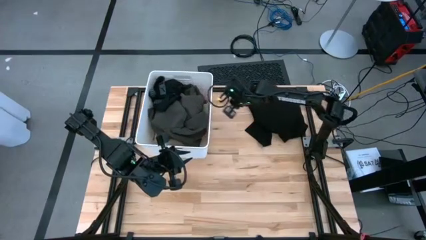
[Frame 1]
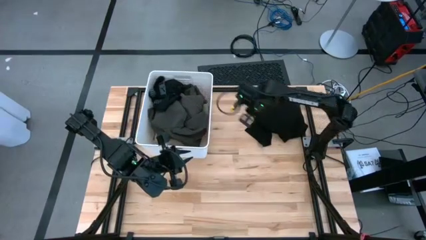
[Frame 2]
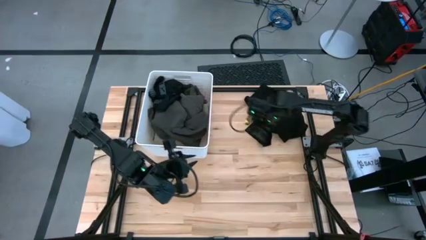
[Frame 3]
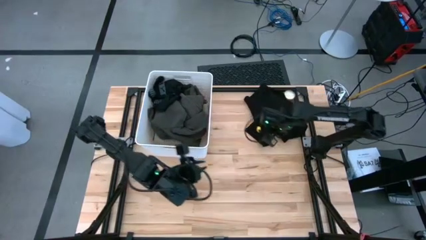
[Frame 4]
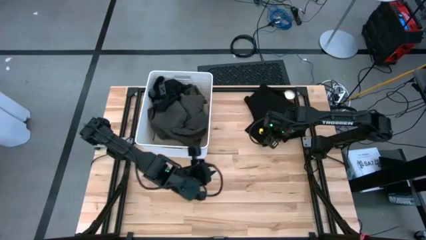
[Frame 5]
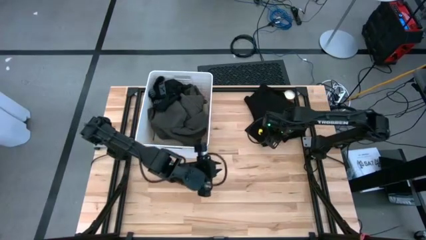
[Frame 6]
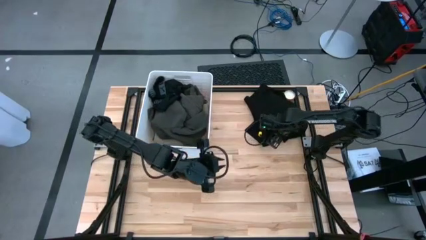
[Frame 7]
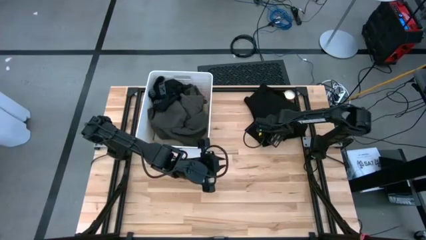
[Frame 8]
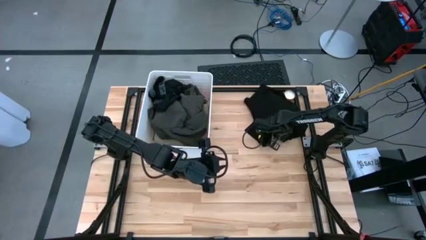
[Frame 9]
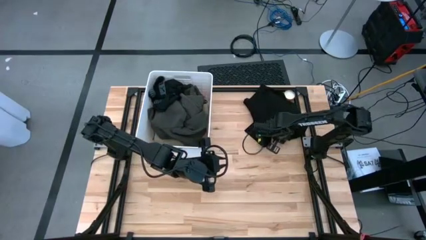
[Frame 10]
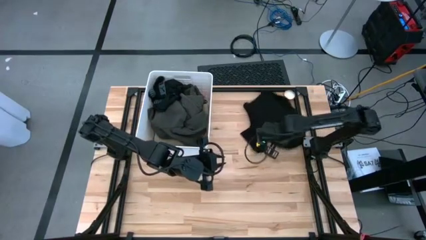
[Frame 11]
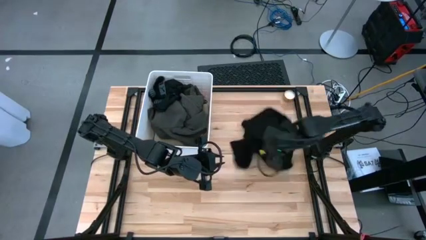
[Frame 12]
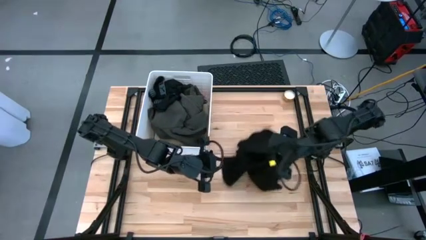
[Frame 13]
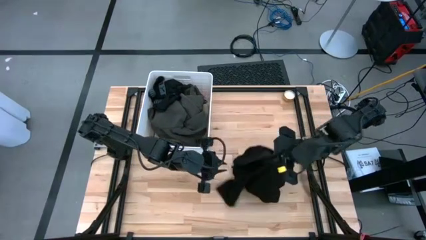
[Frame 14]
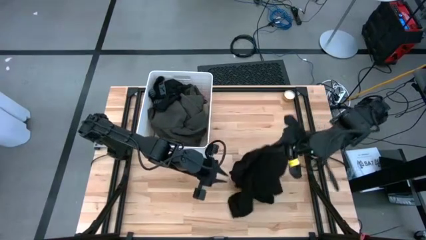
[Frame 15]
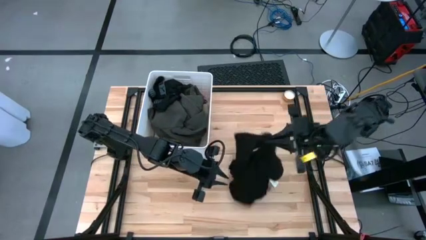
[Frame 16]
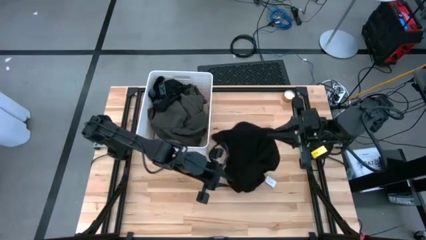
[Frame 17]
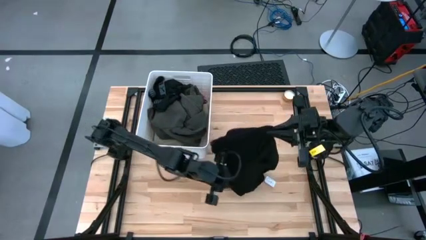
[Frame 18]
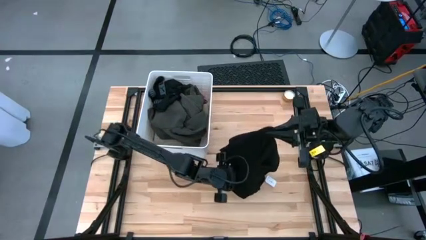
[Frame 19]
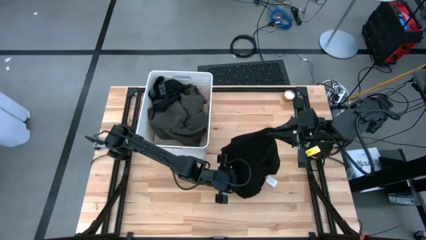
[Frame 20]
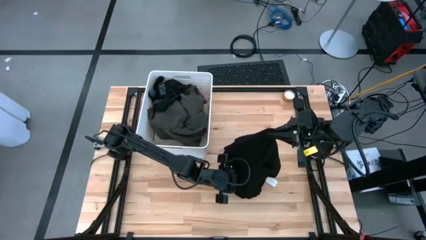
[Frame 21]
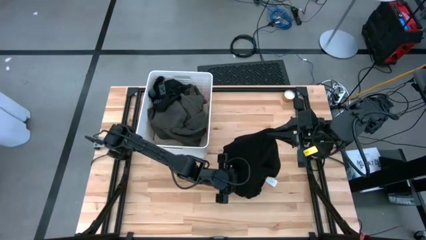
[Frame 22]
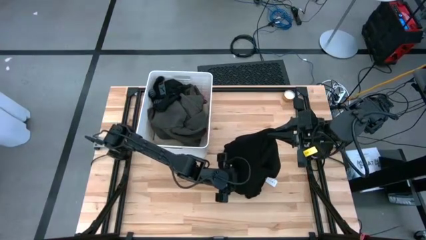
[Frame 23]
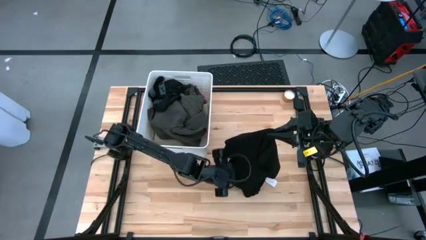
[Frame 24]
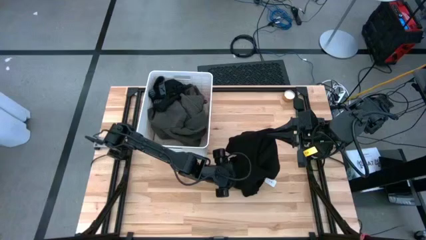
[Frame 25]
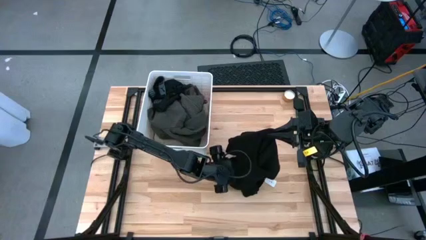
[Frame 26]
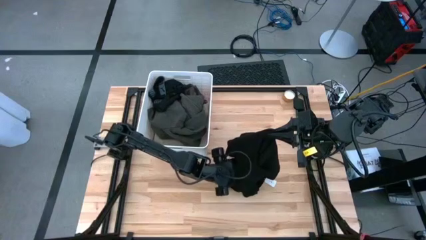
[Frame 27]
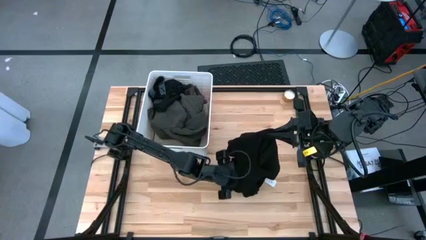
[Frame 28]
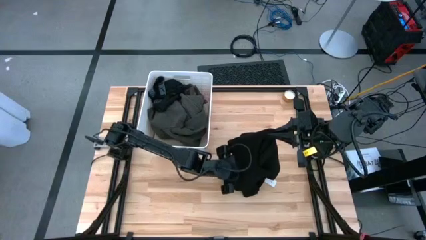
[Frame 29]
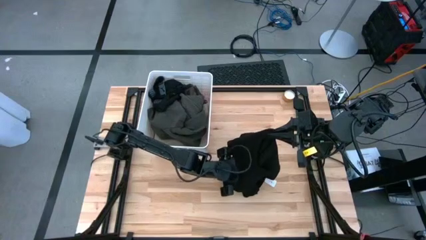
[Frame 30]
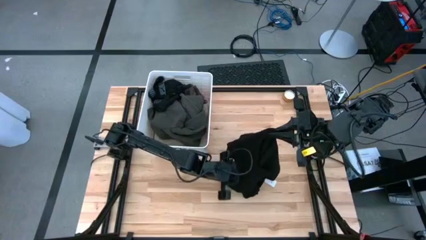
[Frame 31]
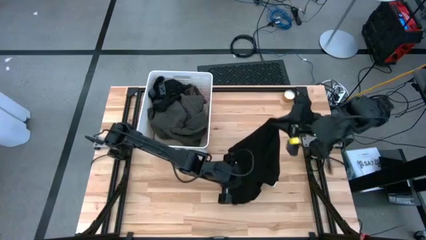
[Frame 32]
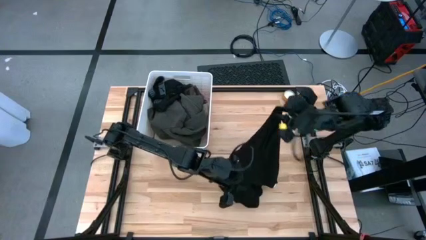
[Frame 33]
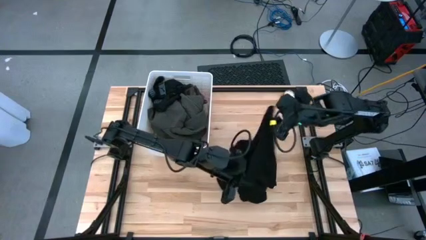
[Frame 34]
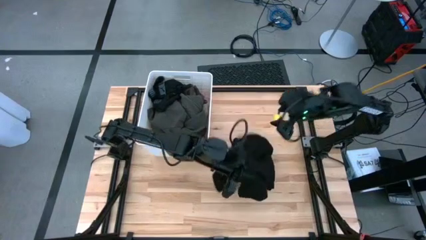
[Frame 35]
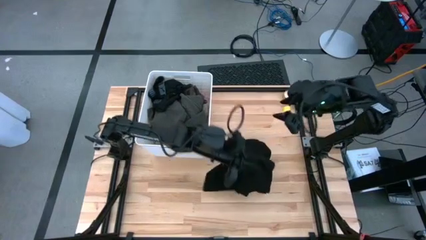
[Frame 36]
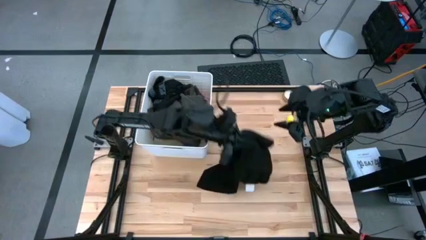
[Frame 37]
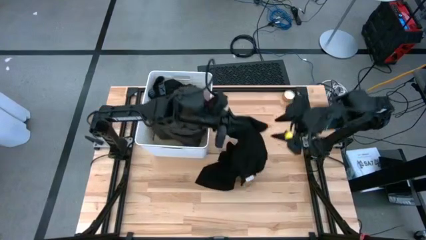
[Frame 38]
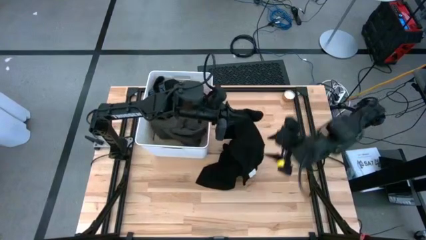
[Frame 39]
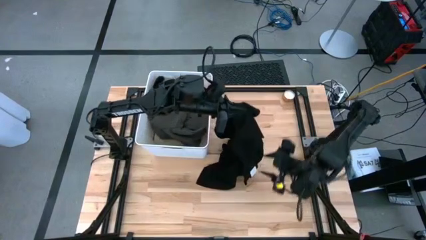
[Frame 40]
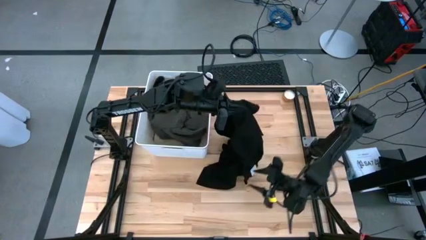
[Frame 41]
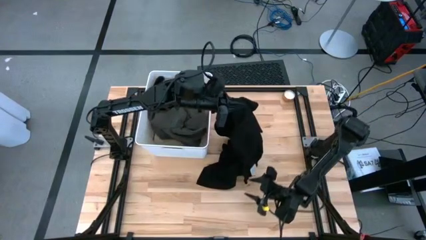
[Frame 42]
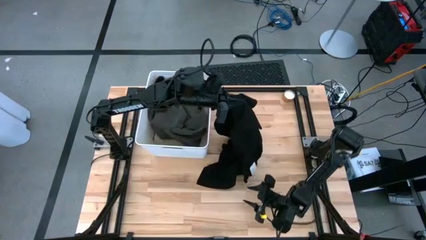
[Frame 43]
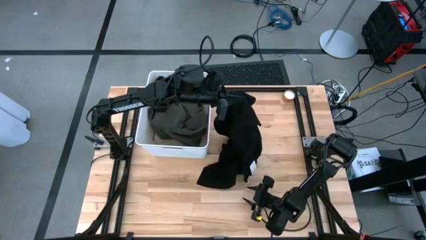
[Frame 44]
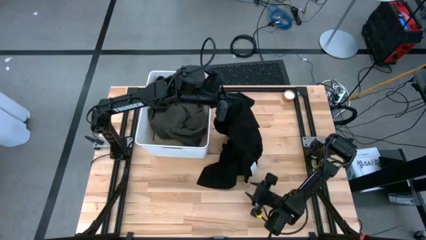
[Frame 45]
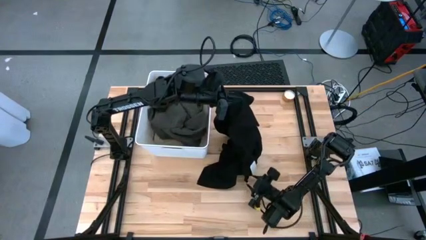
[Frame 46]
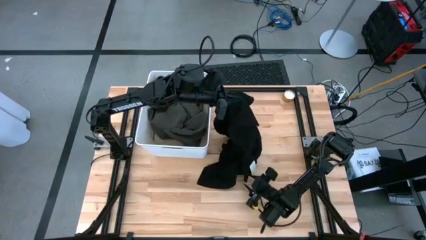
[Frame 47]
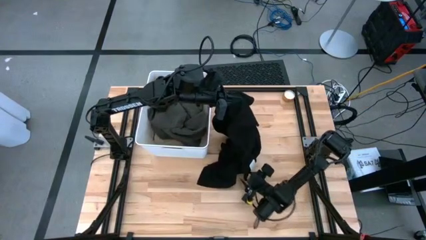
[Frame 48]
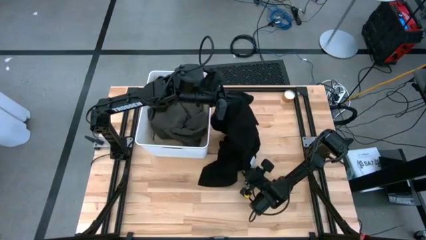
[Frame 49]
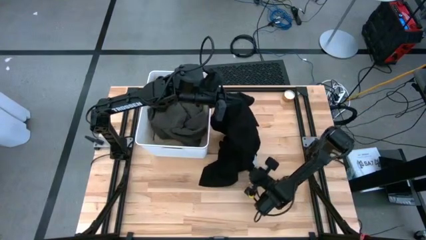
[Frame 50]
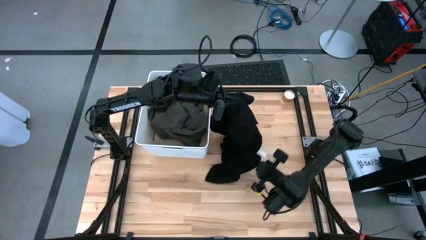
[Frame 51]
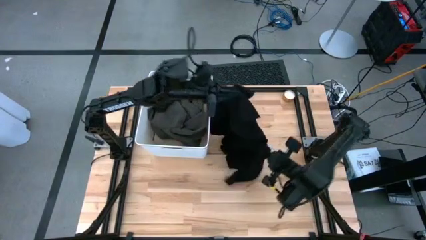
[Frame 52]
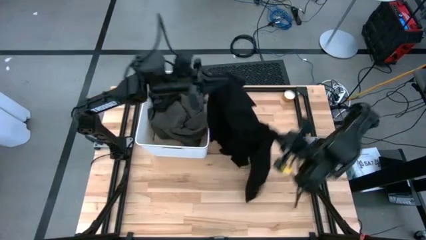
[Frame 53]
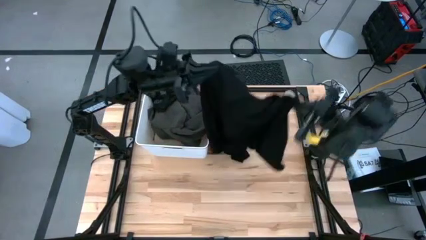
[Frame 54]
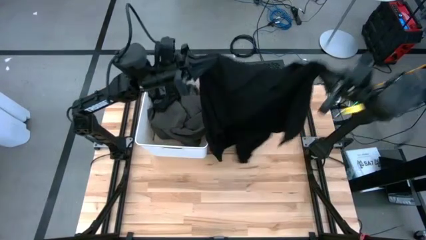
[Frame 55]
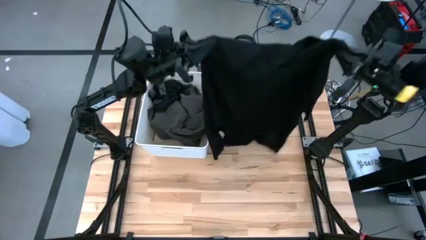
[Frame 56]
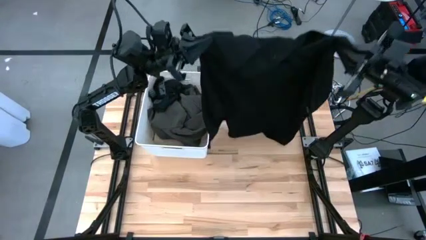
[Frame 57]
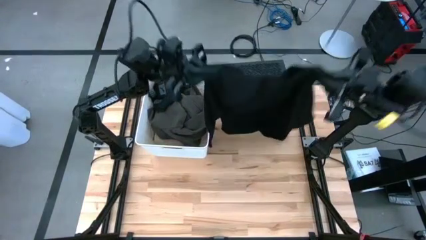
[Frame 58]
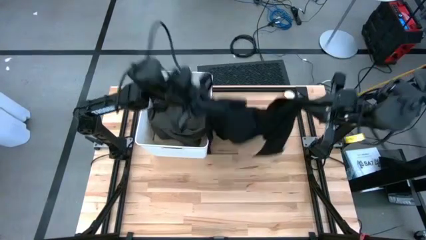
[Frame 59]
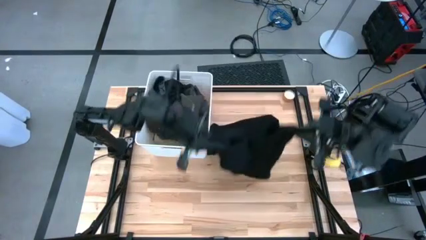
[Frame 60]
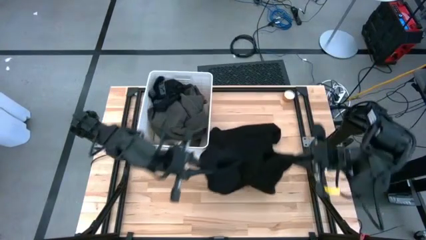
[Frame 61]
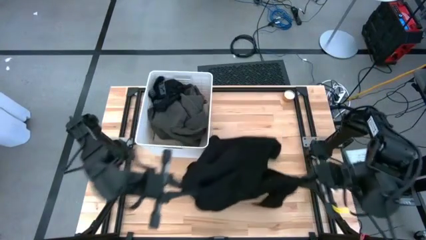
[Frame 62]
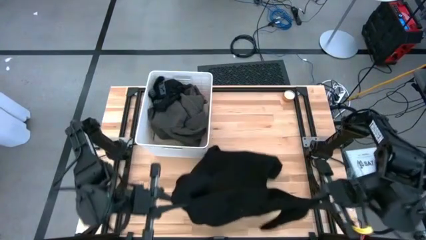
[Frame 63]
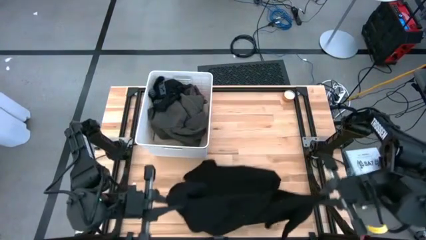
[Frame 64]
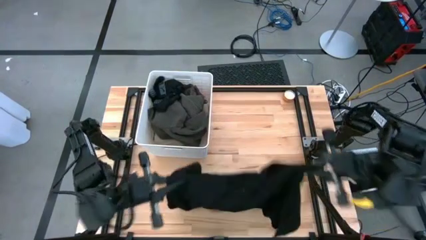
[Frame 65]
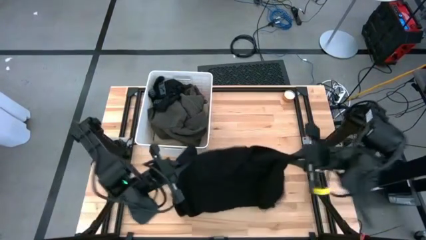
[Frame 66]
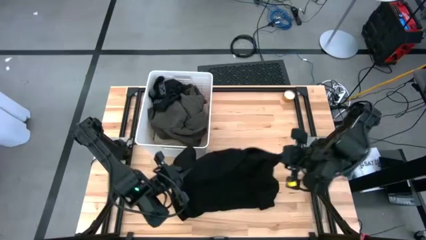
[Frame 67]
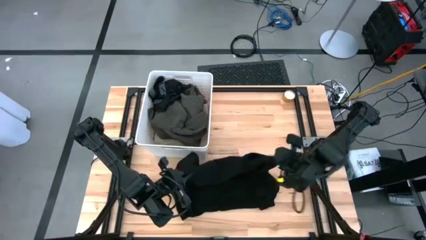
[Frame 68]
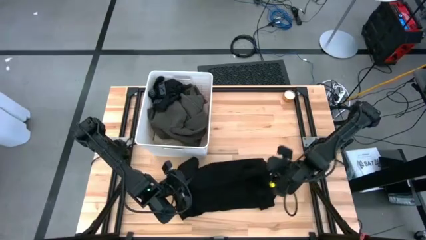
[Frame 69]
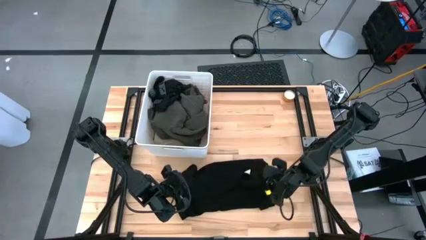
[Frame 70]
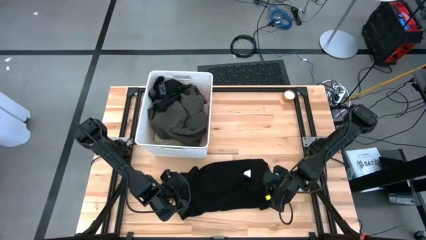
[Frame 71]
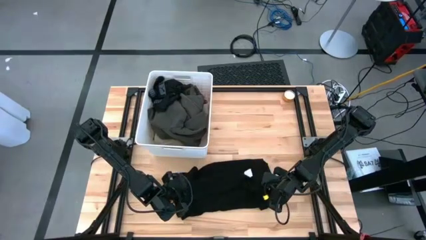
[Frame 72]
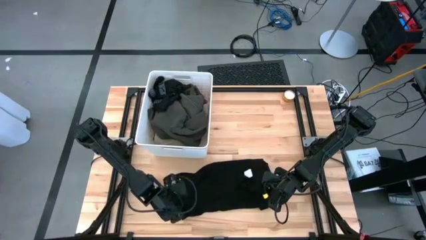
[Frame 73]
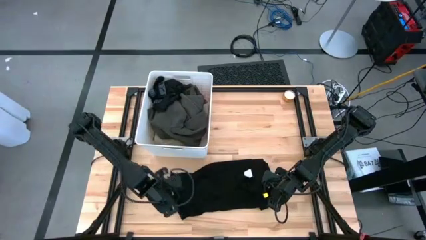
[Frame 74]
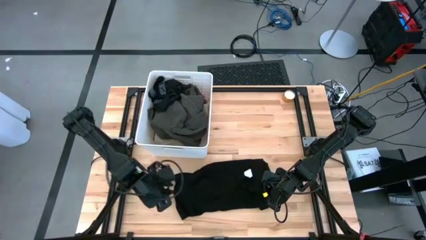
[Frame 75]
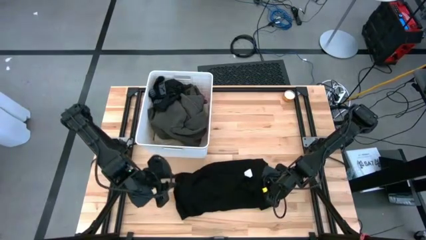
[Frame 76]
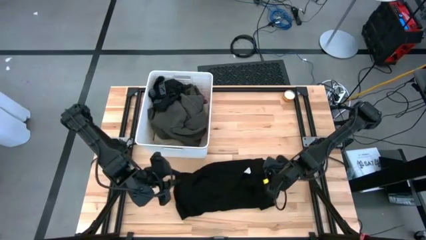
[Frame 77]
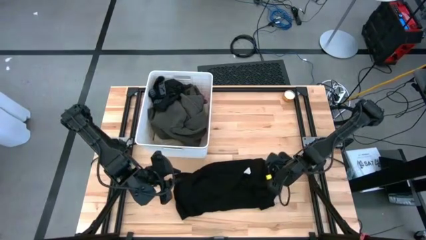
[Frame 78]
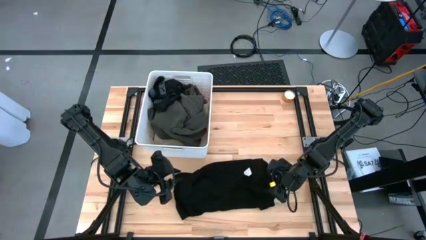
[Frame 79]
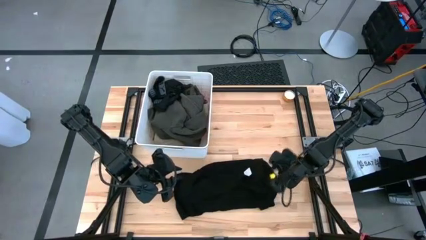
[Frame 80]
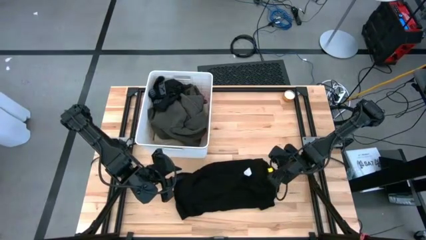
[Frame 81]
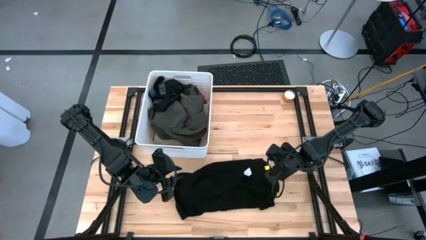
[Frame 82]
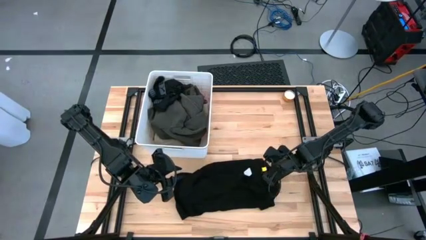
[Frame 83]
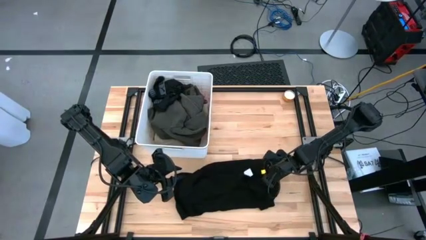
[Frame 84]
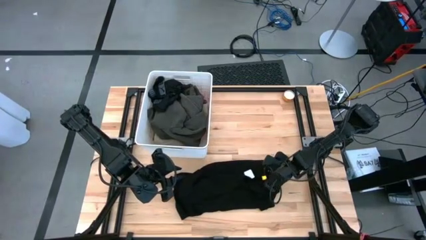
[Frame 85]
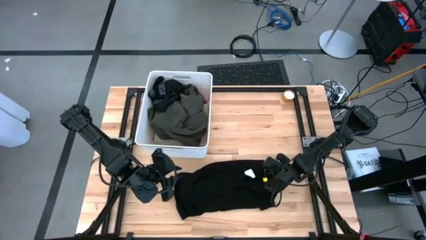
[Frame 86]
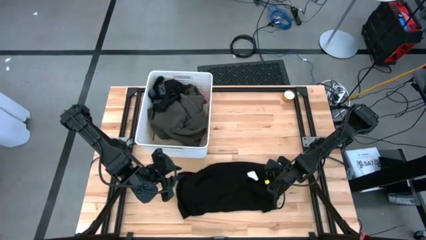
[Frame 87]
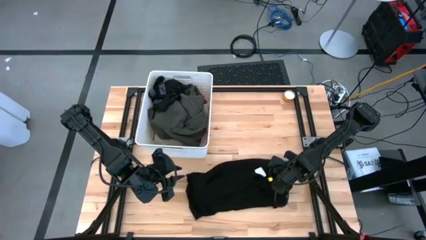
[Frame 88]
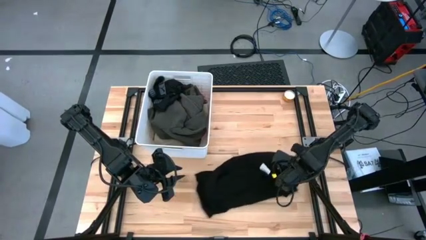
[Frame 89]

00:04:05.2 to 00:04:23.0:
Task: Sort clothes
Put the black shirt into the white laundry bin
